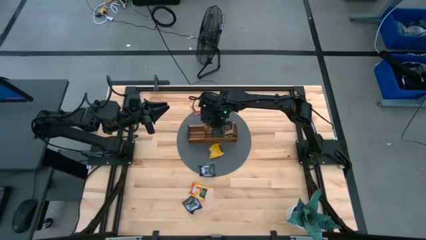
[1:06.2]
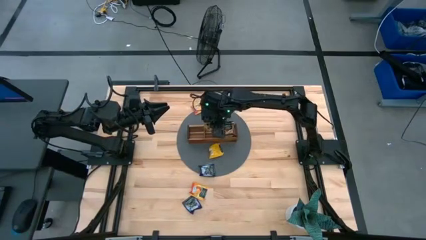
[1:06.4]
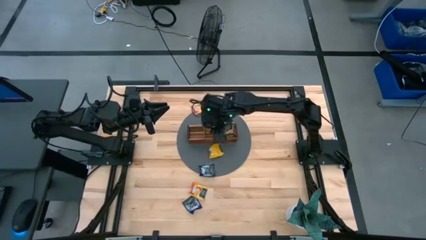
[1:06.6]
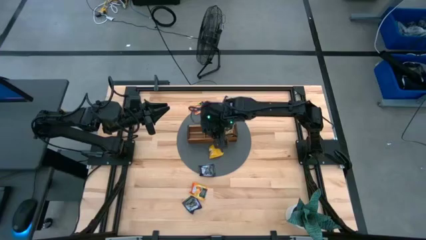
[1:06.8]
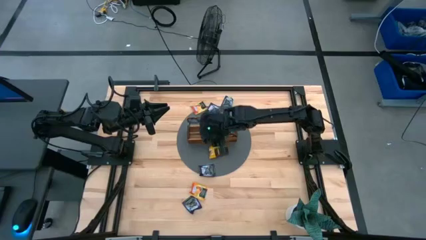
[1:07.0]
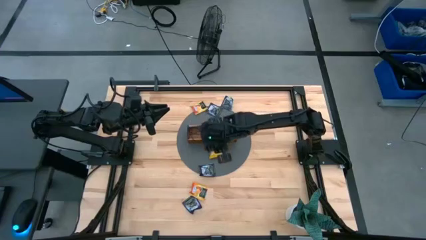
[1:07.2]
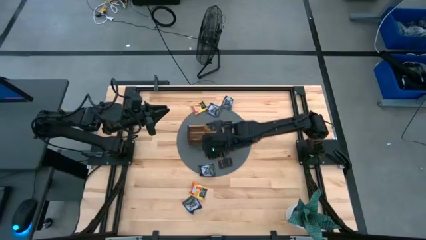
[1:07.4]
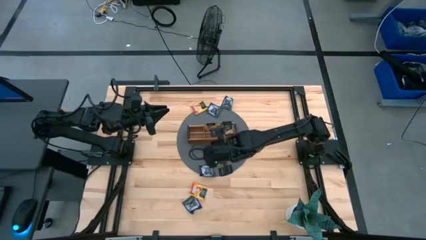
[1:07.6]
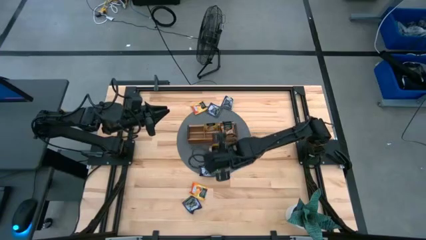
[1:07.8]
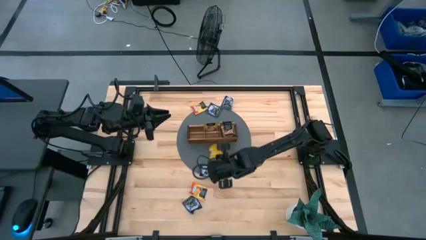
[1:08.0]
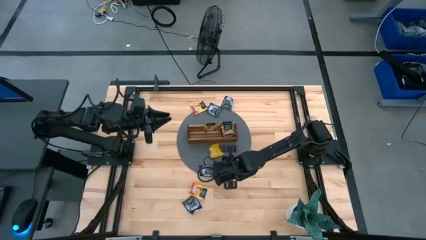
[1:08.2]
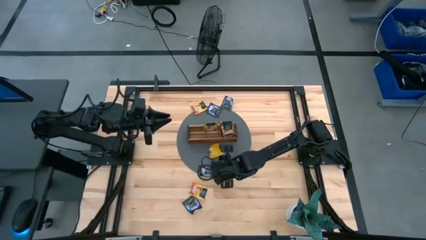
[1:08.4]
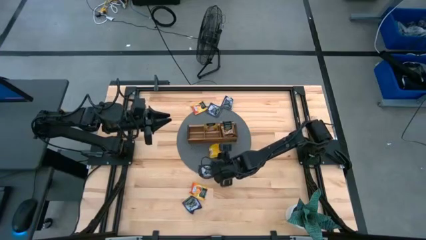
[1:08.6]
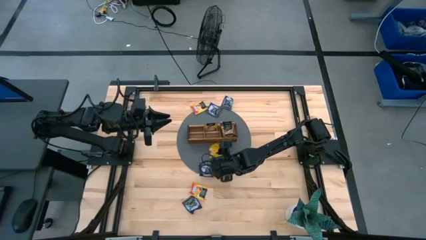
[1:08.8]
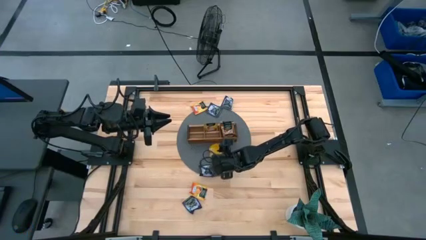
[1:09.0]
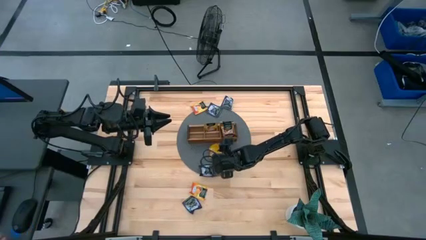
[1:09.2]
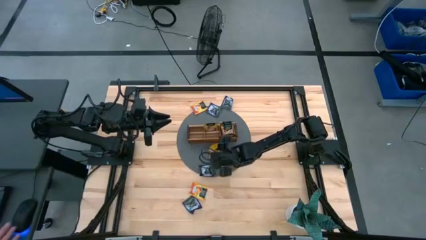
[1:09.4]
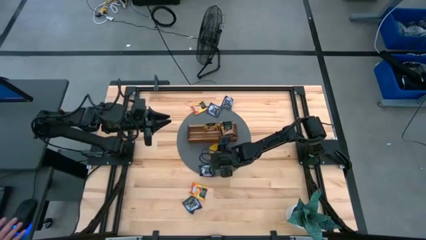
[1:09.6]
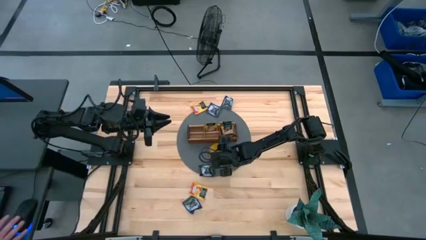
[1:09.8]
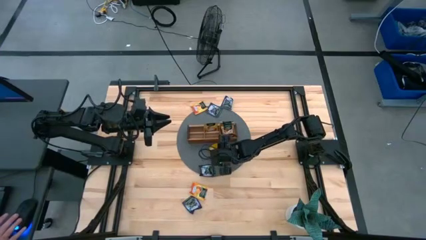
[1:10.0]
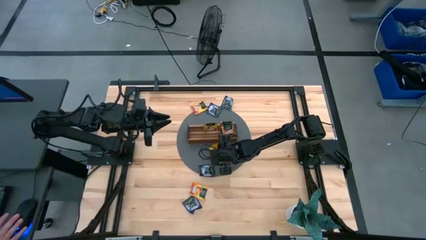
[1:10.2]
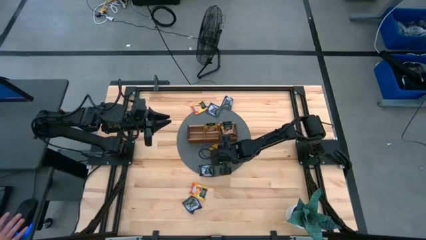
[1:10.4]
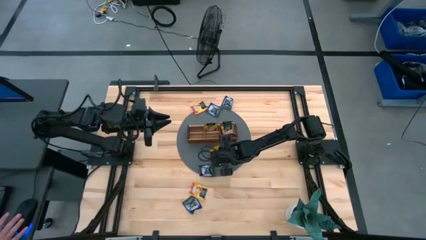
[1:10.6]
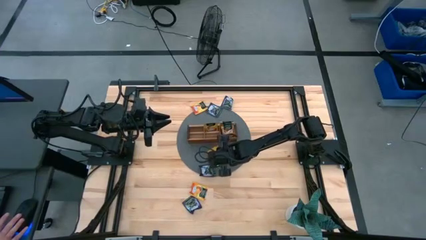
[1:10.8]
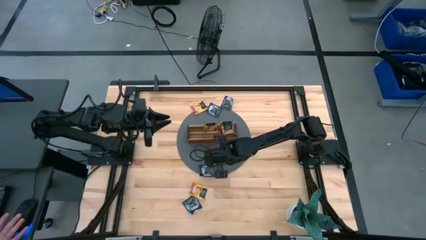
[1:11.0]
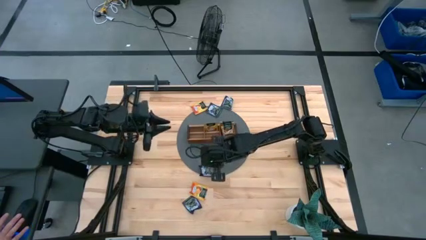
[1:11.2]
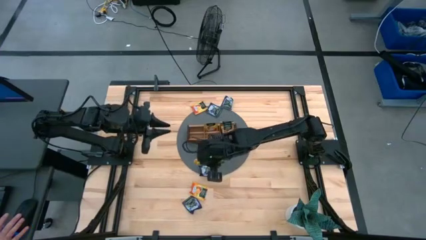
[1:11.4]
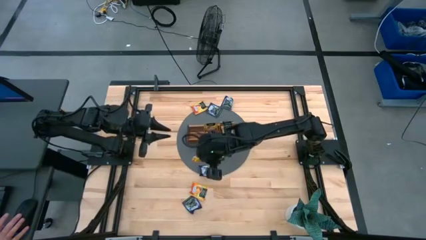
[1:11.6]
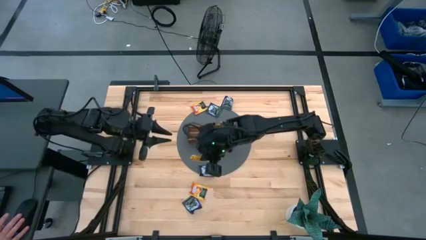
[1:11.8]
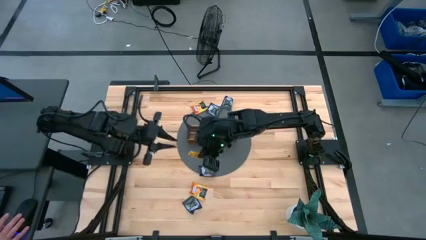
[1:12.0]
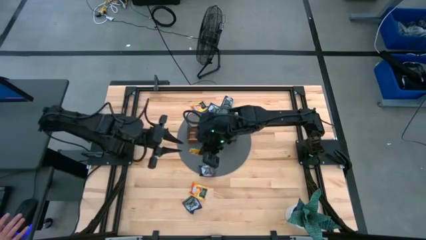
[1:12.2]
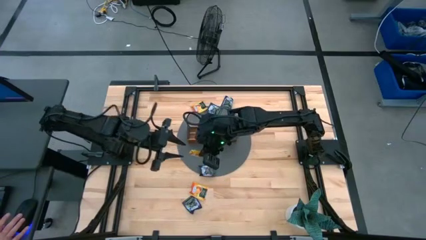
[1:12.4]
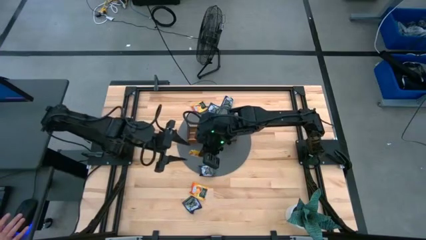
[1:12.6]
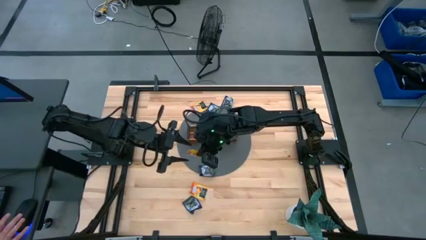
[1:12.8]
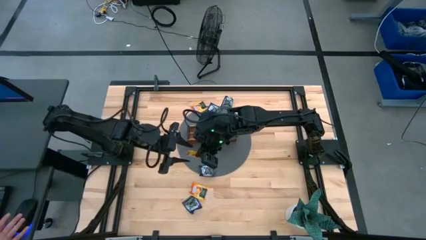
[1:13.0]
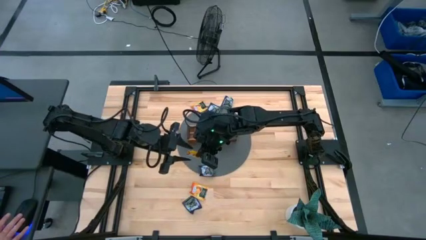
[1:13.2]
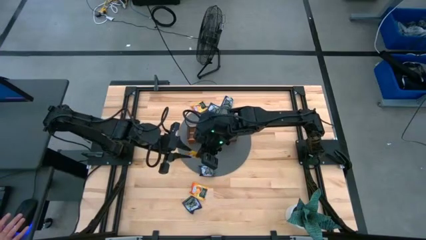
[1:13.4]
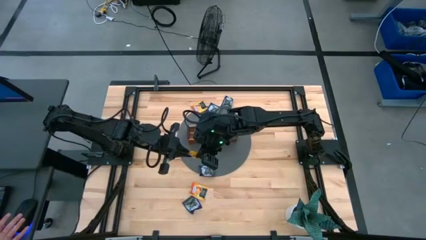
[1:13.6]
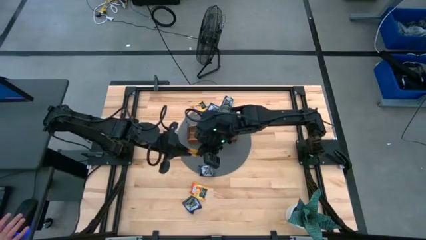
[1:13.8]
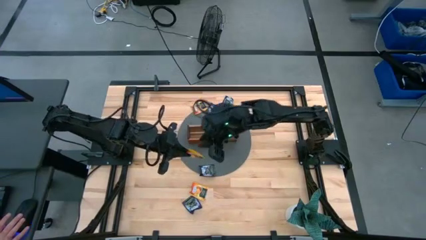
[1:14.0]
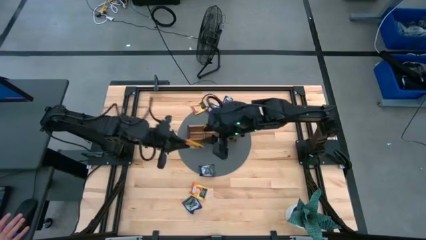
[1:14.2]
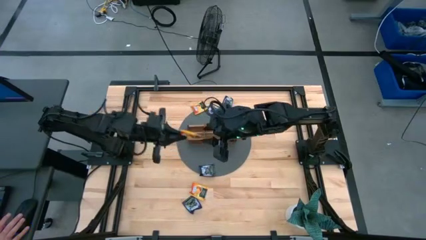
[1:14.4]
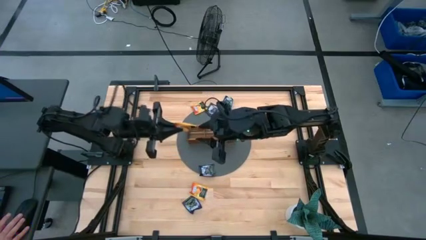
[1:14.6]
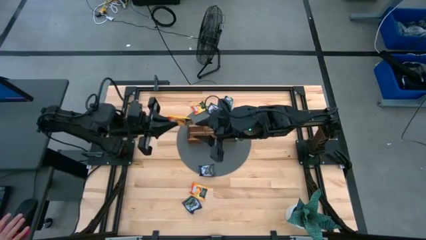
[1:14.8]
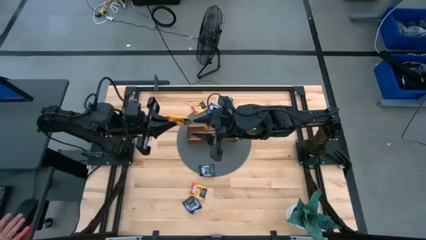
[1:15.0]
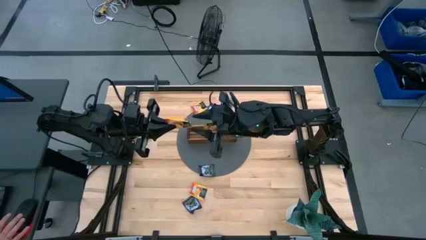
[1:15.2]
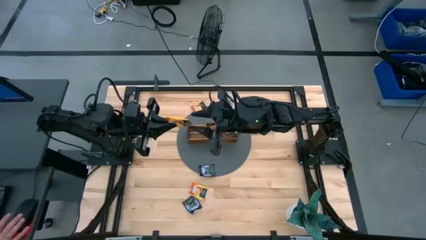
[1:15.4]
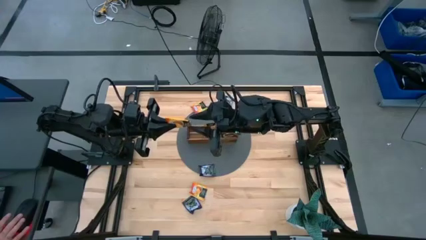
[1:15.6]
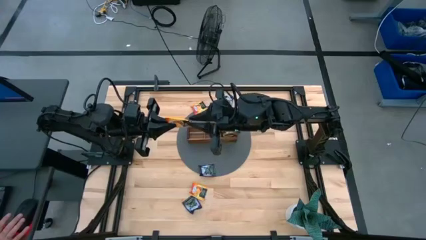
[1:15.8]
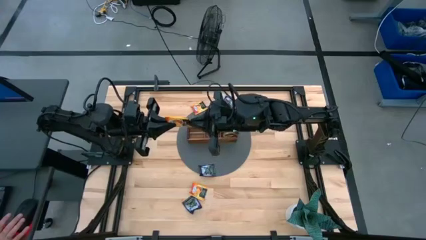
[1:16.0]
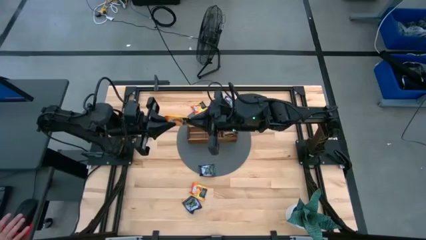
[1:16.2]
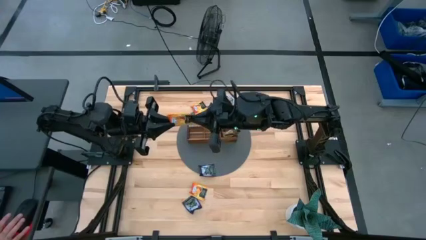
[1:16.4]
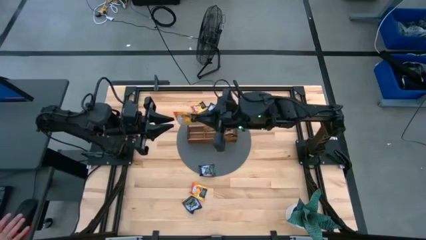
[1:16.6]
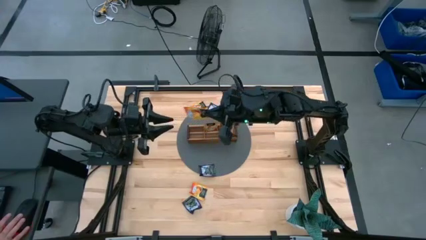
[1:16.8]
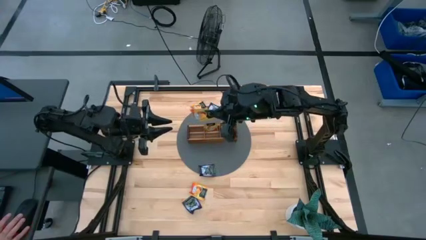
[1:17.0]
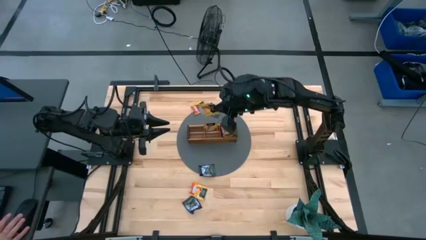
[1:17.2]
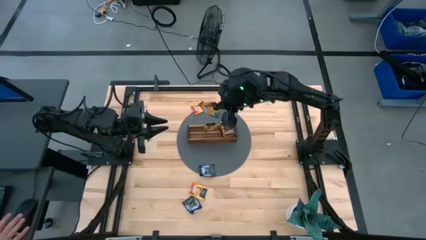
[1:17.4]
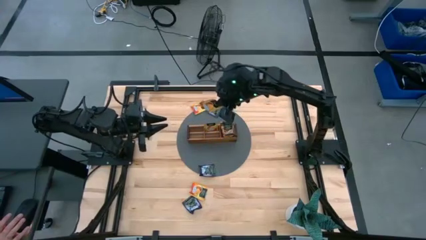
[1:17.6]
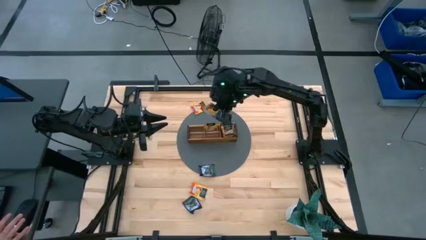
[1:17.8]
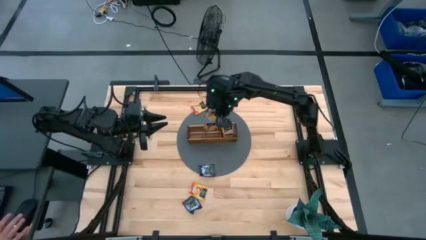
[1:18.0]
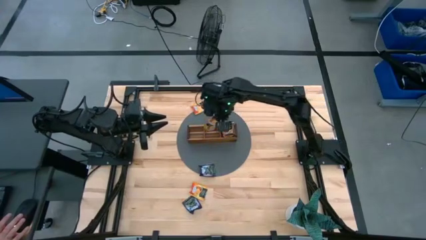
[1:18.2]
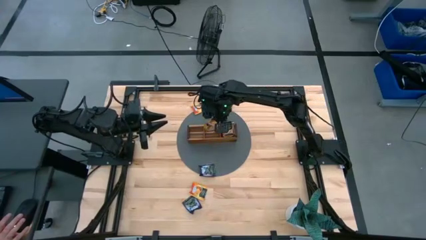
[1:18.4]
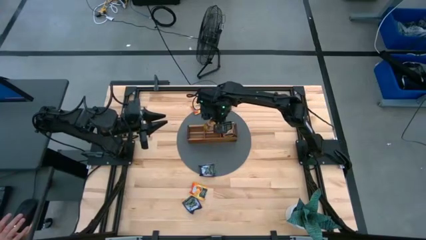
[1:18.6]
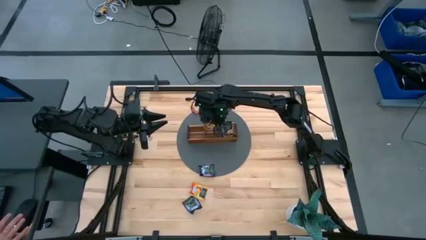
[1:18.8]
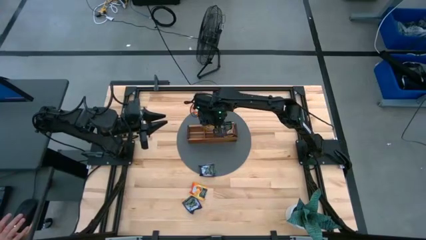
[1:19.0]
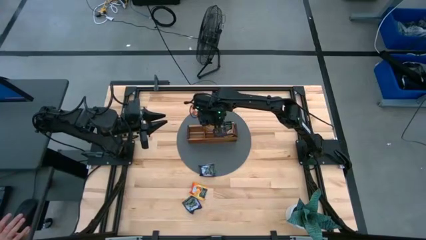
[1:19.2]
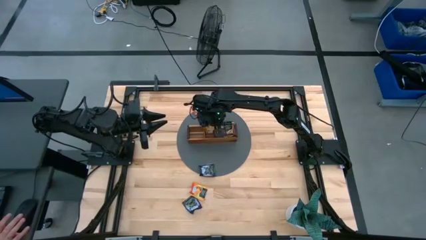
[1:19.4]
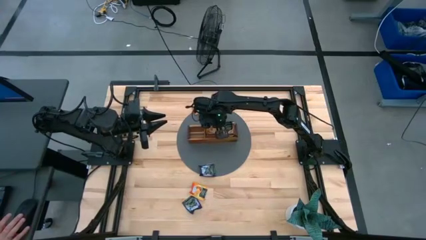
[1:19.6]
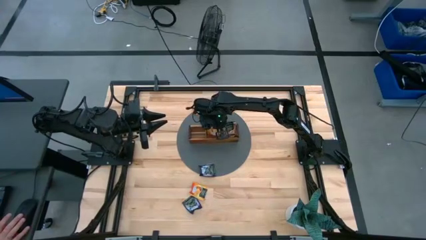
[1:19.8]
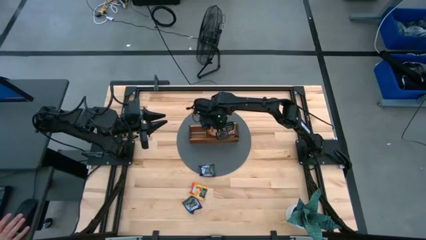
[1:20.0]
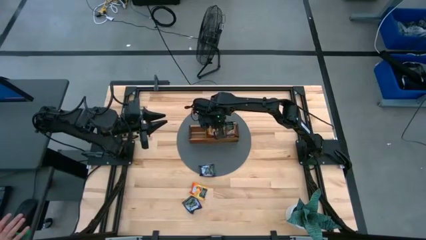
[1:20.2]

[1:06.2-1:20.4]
Task: Pick & Place Tea
Put the yellow tea bag into the middle section of the wooden organizer
